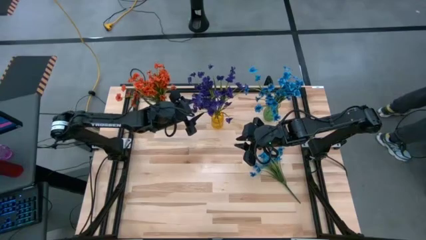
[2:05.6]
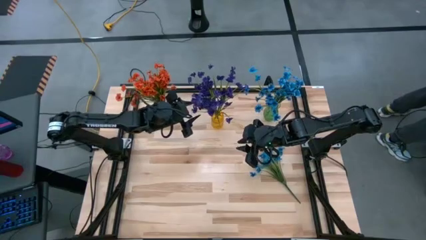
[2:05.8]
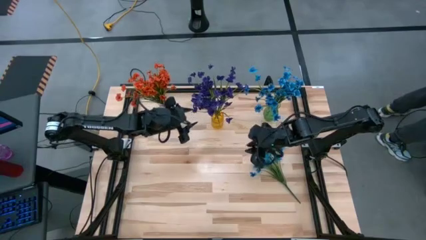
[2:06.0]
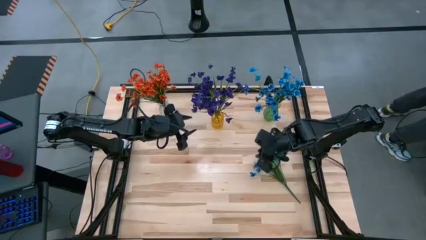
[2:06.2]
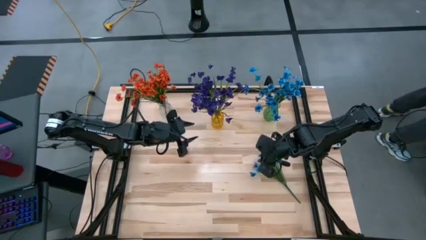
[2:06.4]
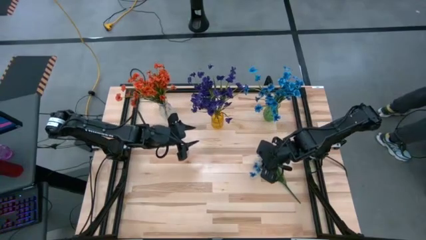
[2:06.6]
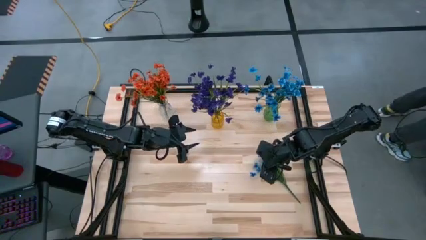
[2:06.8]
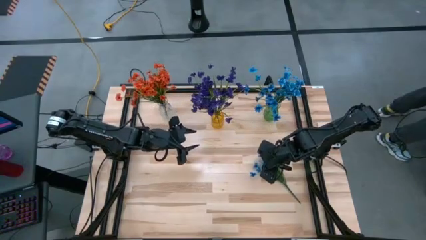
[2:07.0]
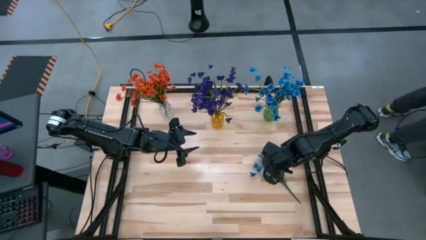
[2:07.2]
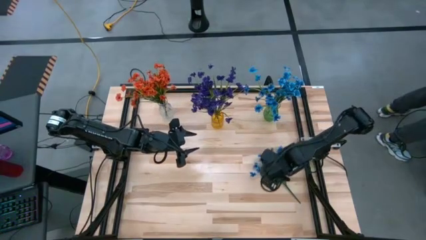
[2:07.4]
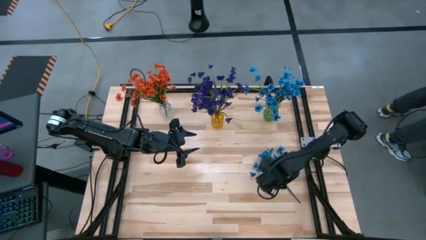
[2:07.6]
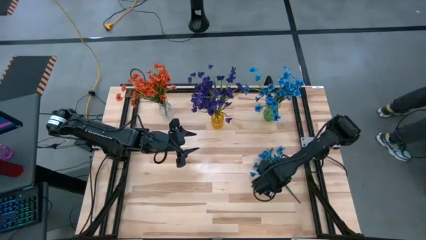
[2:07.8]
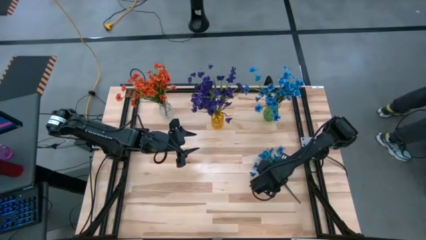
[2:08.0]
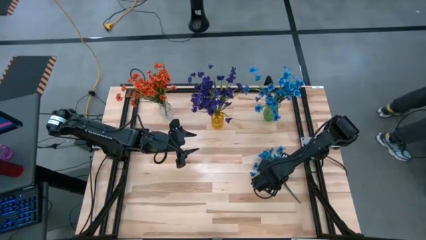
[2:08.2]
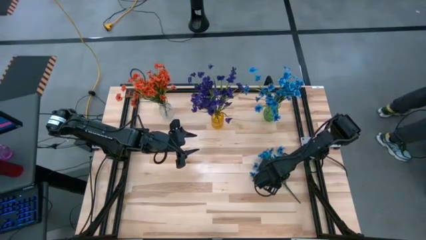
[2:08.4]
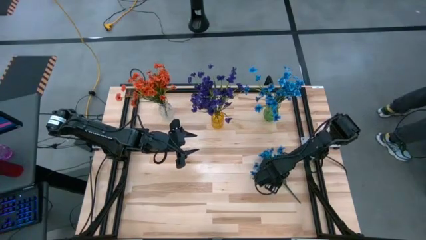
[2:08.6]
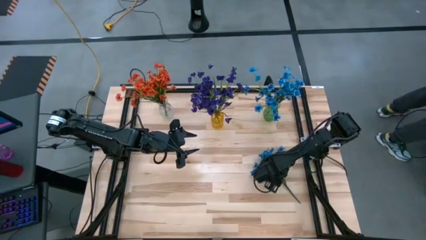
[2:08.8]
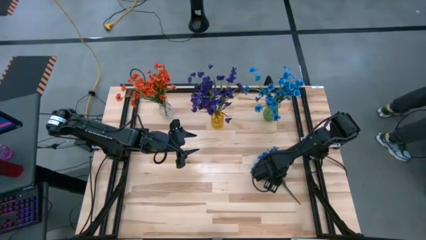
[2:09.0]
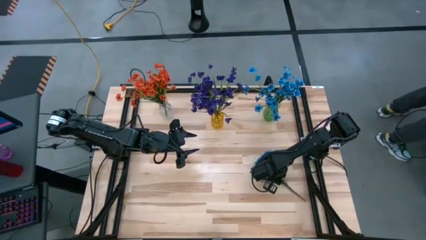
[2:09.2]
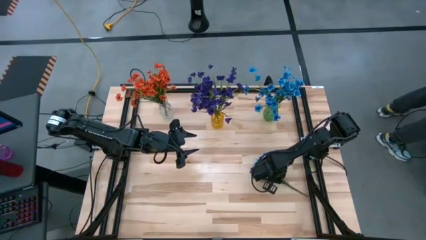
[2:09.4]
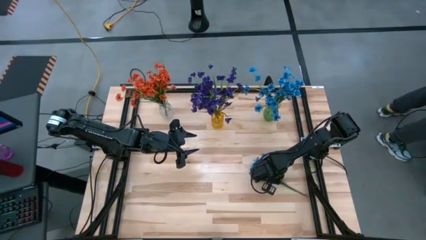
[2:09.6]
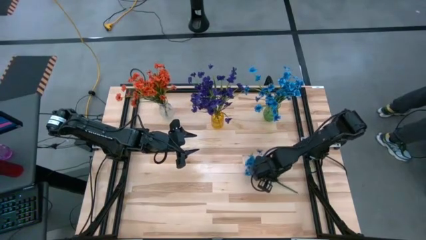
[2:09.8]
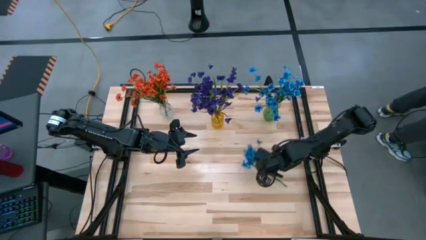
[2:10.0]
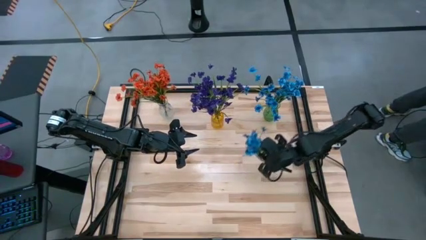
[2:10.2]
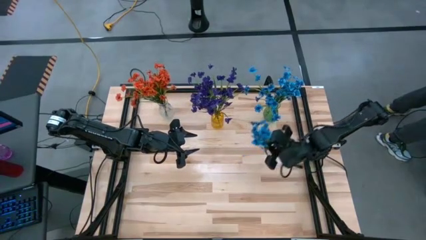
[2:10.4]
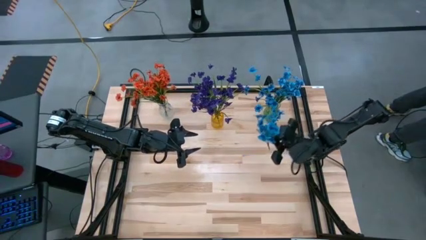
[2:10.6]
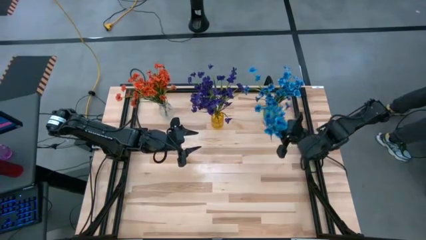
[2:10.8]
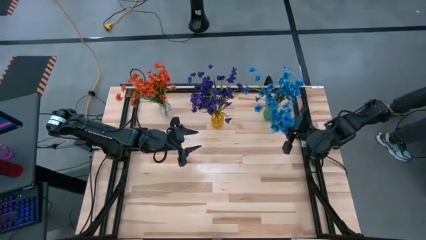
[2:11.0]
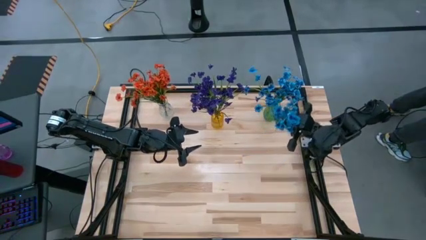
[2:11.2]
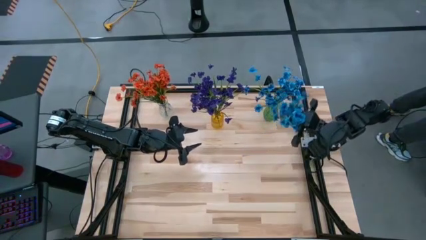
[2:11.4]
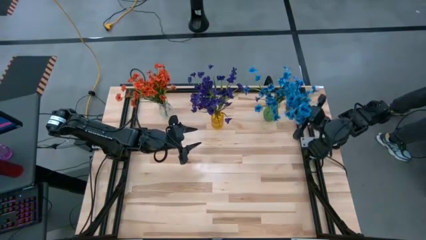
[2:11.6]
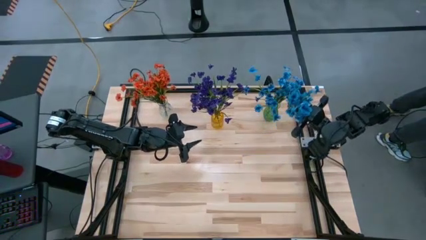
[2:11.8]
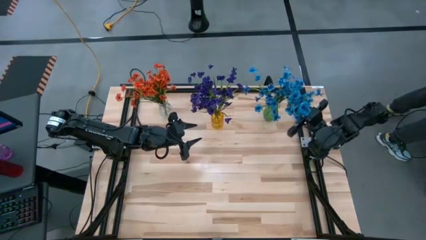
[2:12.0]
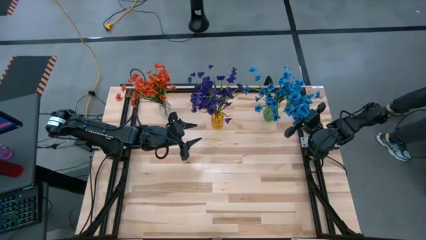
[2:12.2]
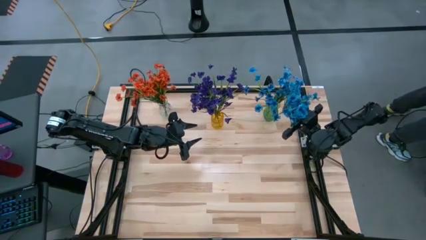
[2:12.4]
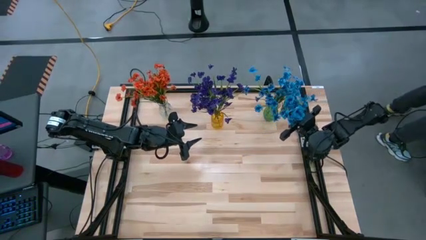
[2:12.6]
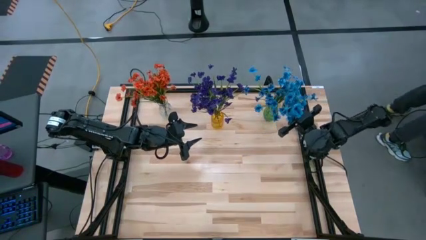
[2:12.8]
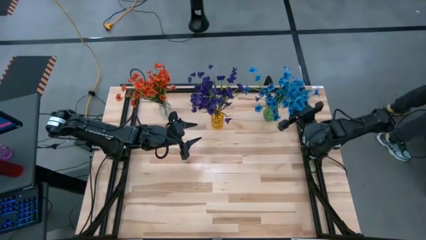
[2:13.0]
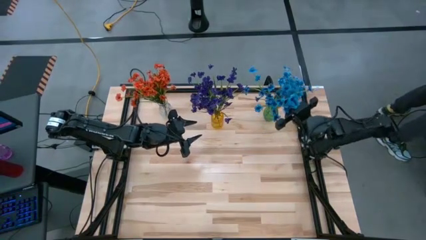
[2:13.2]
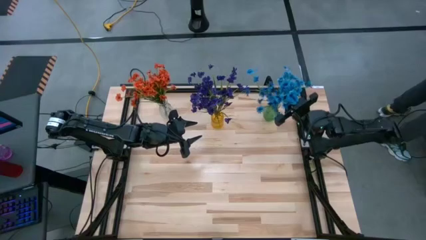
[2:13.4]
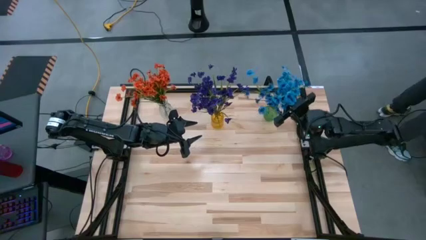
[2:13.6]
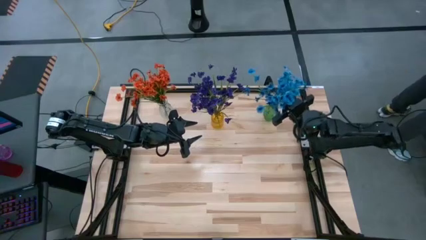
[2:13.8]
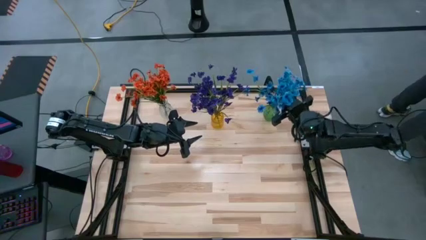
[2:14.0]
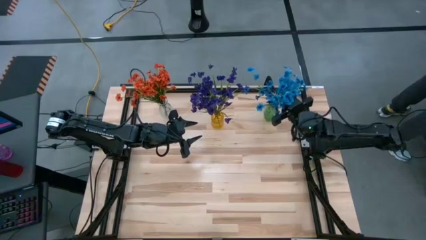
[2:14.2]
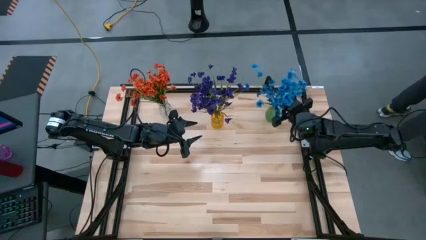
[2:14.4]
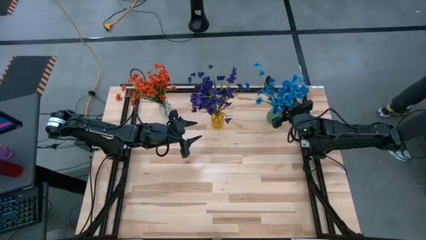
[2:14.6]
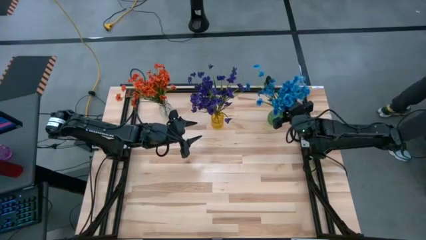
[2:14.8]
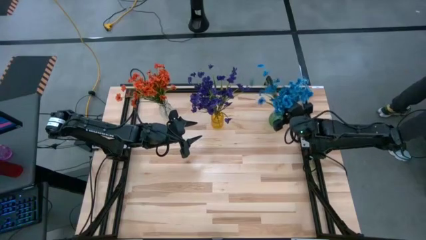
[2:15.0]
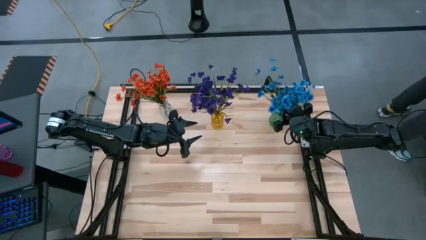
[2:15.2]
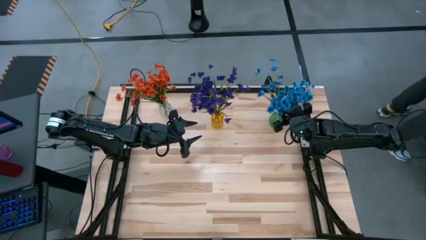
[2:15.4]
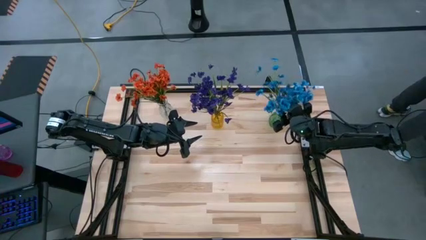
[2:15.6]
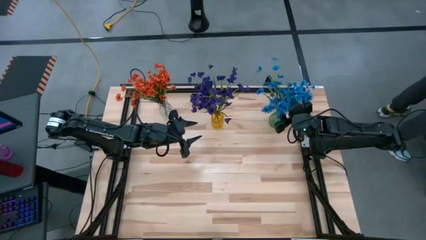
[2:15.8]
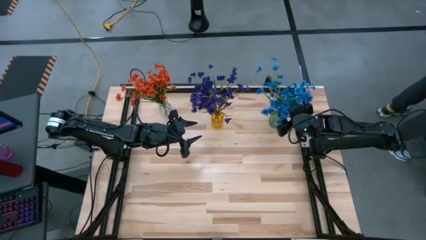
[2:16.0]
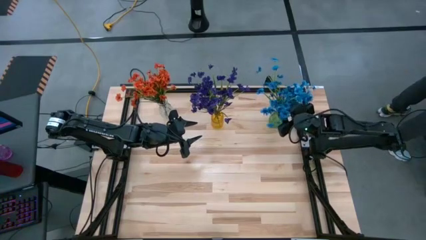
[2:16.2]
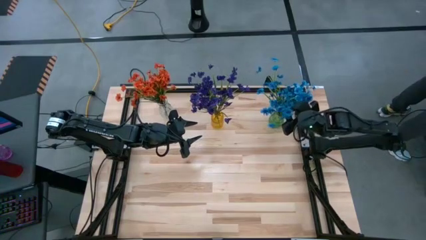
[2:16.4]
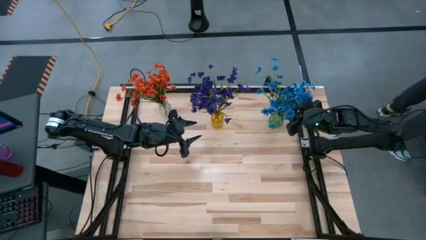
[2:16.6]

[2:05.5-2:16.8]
Task: Sort flowers into vase by color
Put the blue flower into the green vase

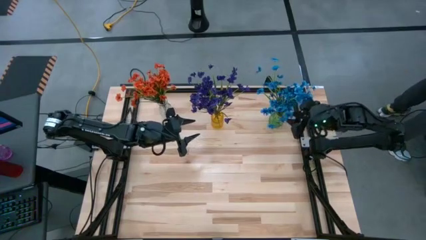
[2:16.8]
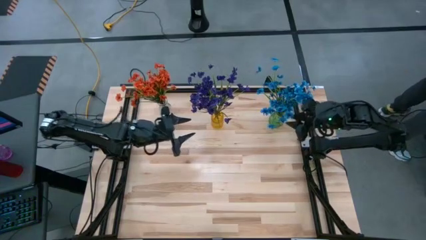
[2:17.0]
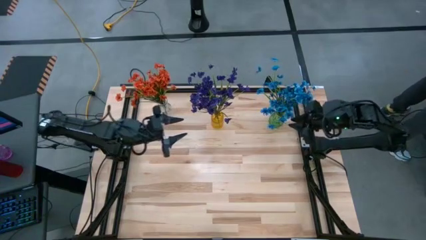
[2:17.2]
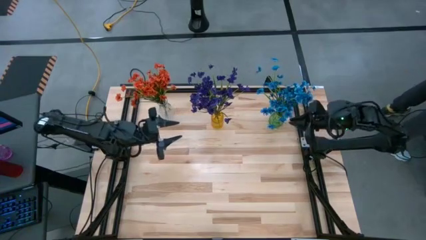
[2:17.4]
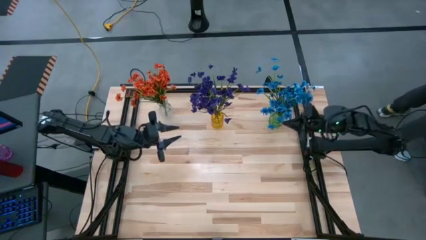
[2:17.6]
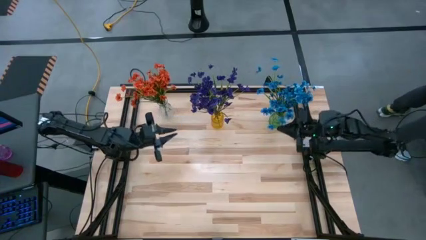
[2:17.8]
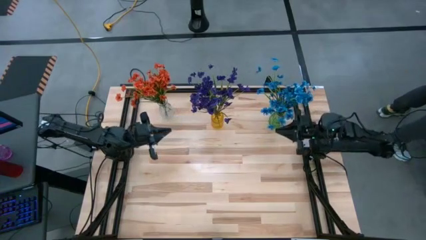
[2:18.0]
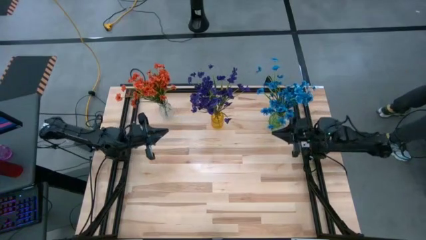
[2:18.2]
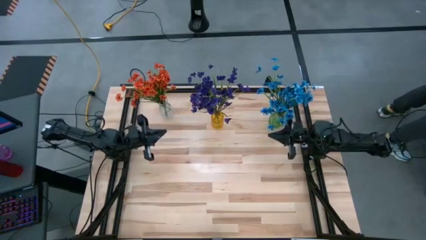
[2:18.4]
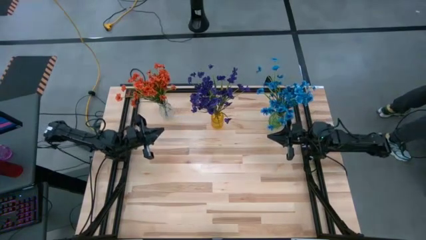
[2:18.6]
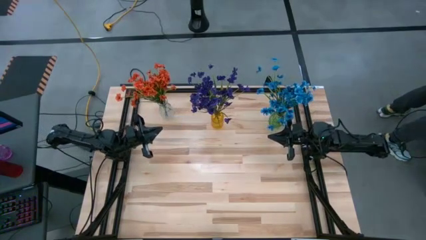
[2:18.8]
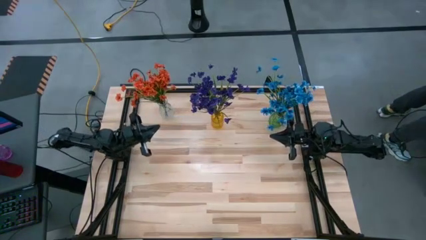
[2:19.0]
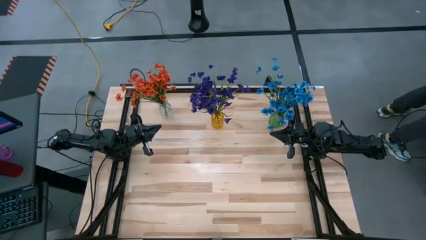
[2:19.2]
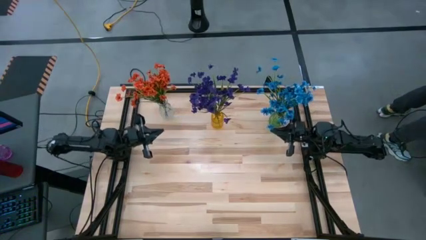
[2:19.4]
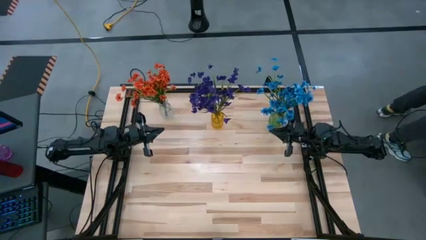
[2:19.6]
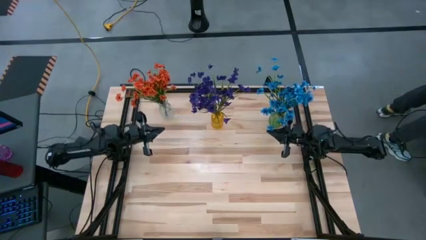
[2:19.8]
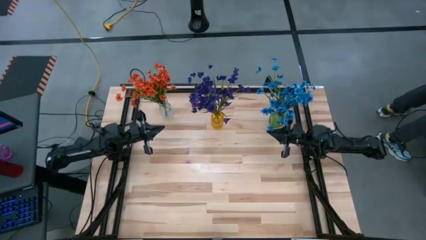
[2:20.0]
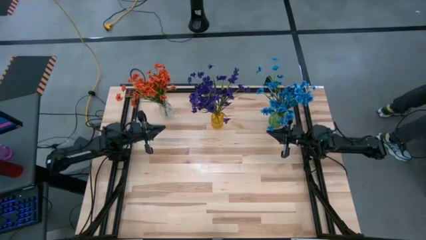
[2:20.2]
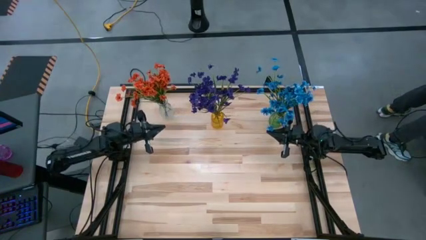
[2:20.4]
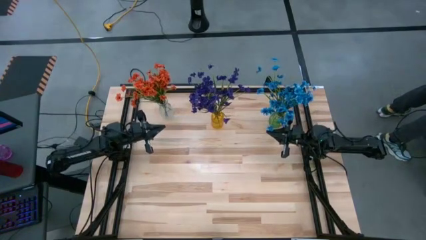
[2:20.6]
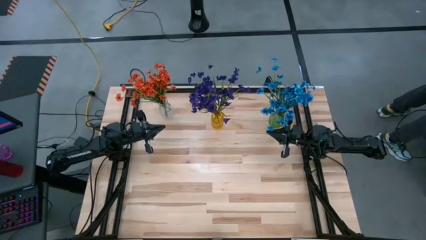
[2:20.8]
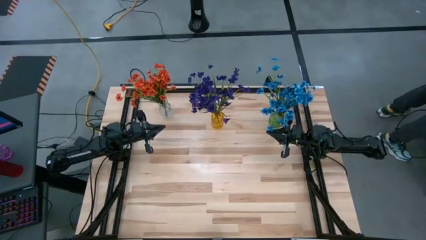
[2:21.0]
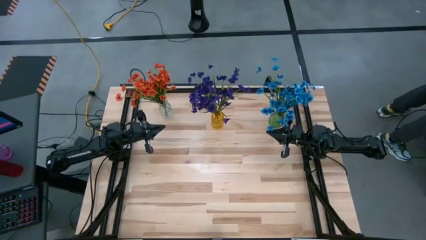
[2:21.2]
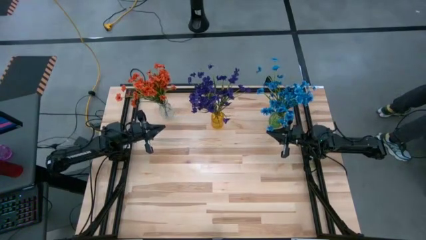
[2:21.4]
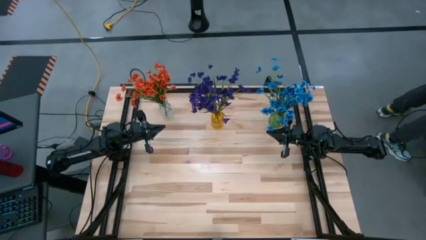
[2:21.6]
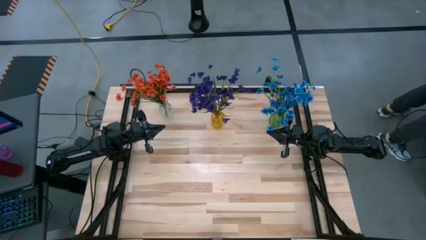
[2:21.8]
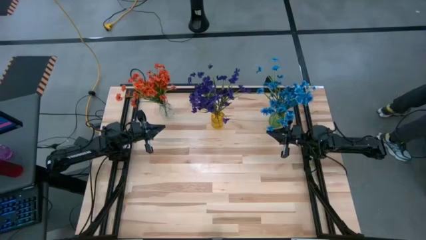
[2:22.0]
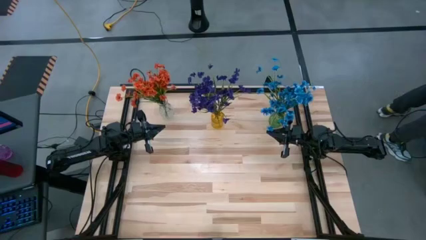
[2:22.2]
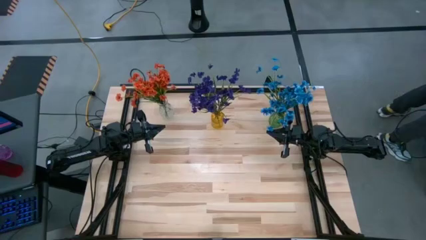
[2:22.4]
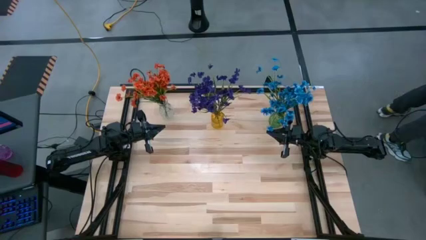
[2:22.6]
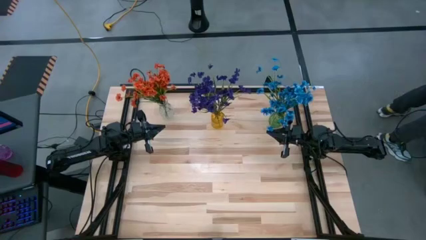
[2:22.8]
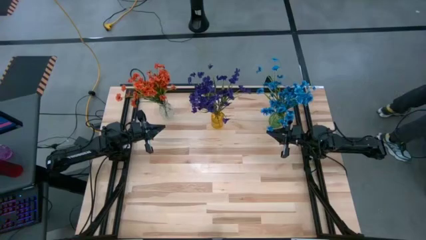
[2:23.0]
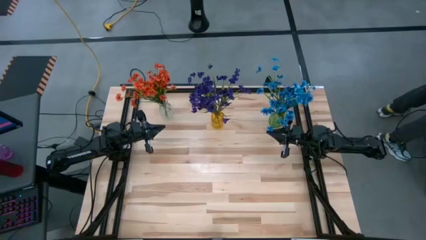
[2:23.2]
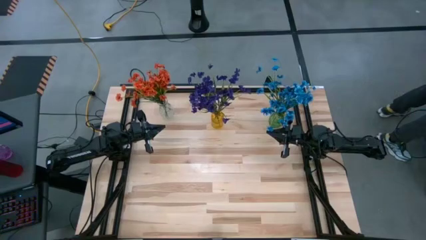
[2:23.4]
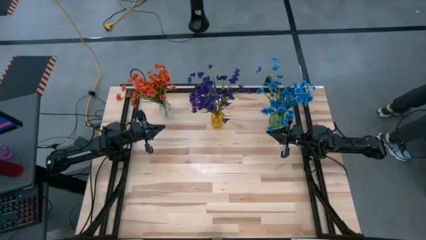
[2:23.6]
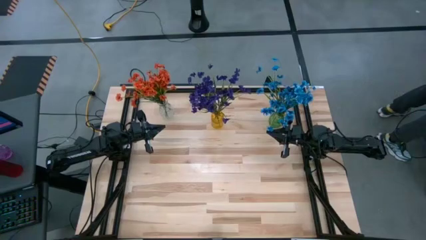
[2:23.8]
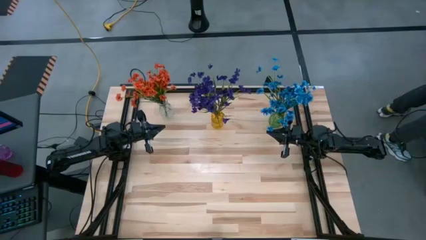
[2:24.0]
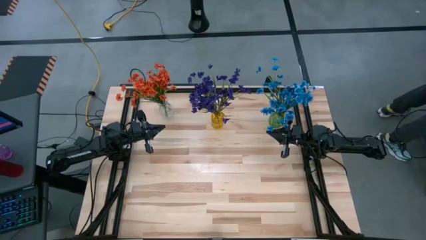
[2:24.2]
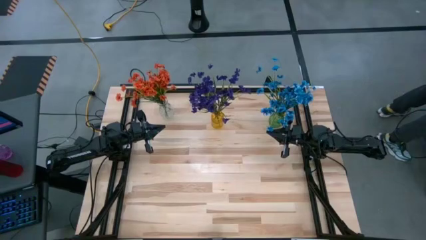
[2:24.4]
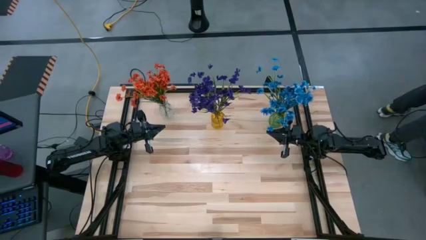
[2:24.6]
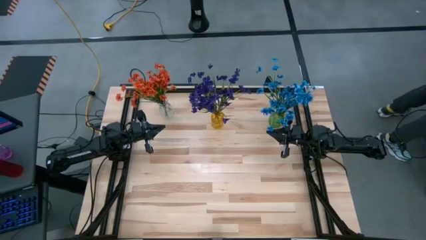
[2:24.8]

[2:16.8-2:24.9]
Return to Home Position
